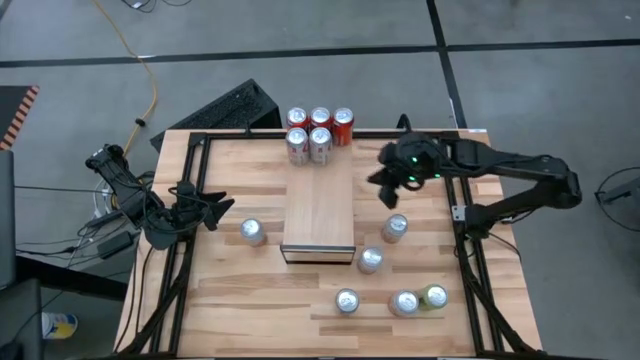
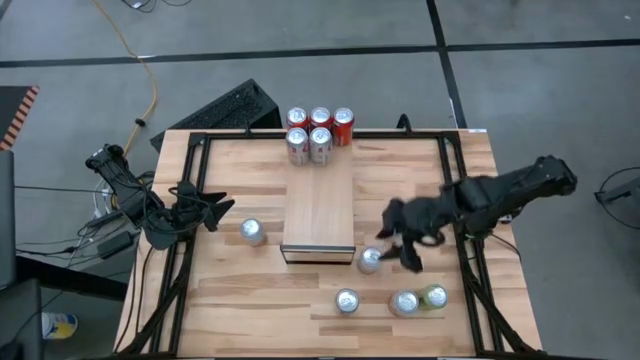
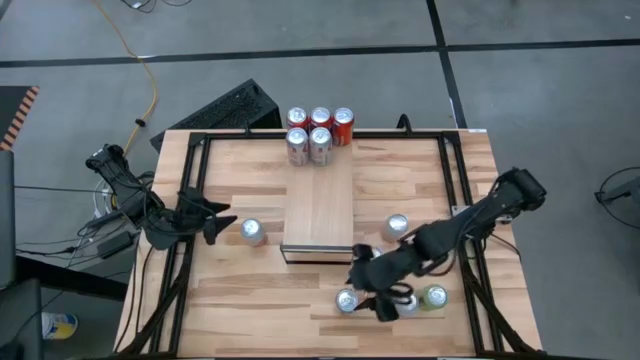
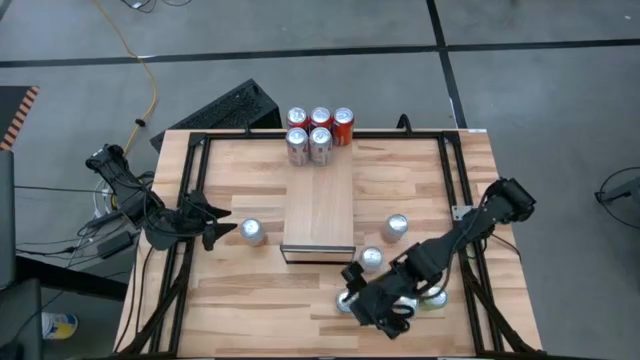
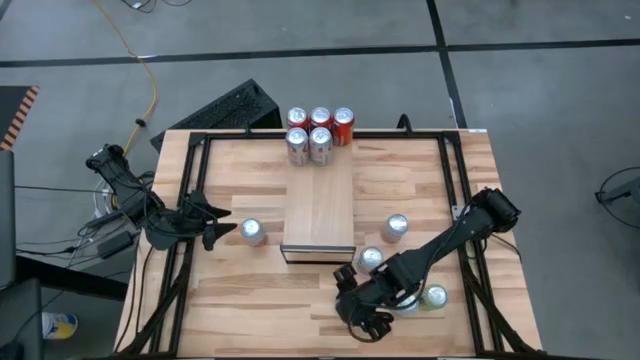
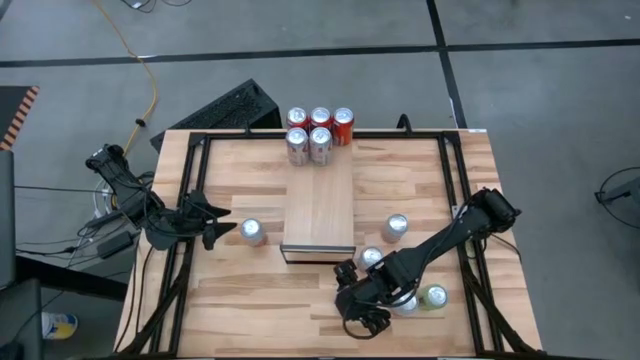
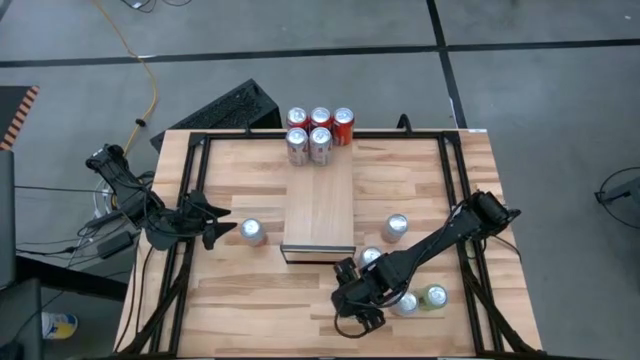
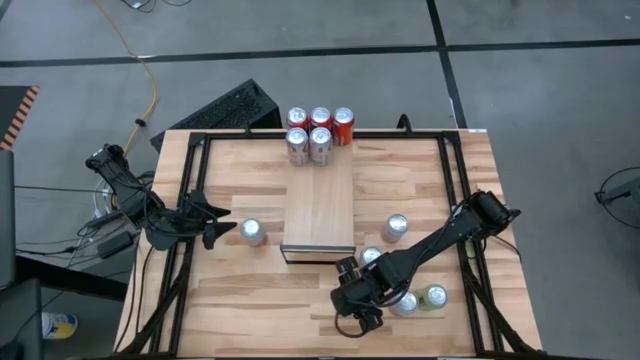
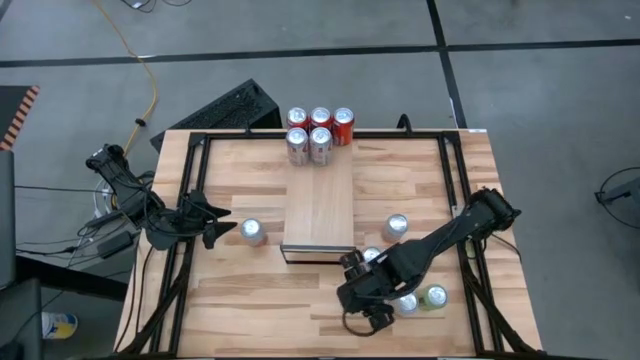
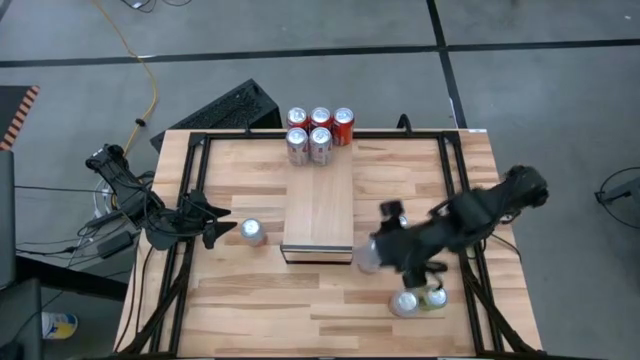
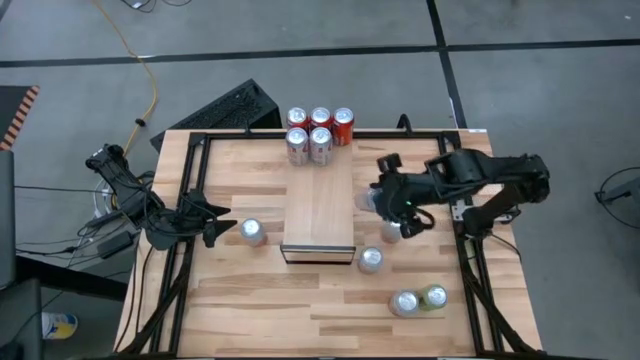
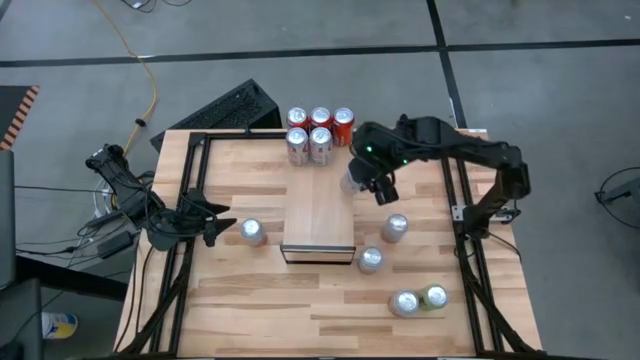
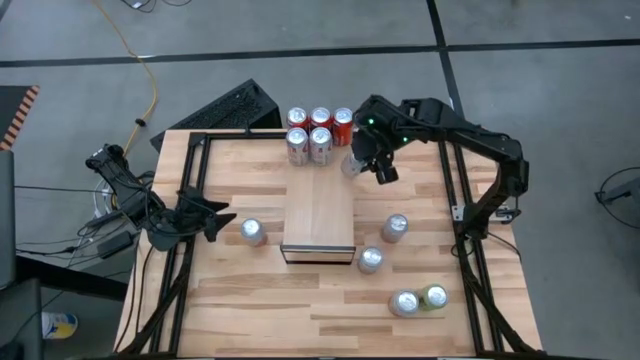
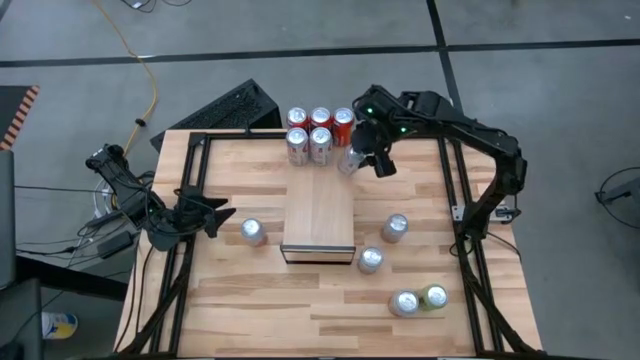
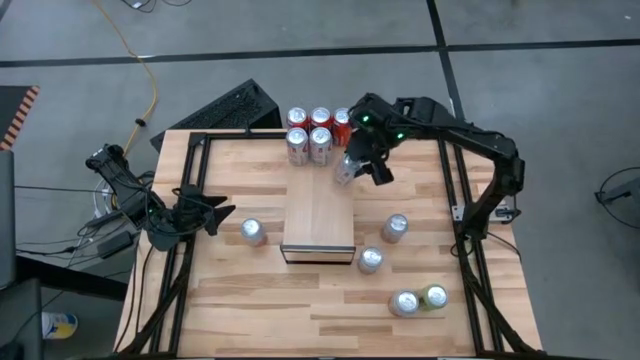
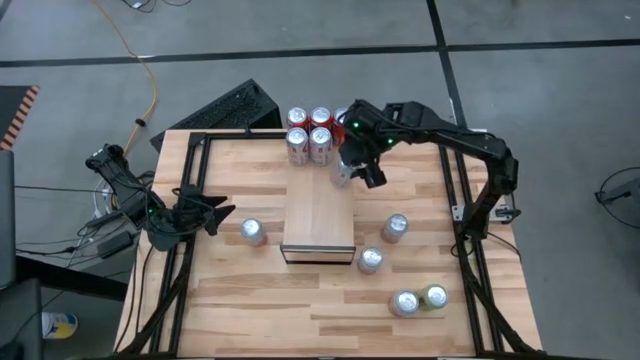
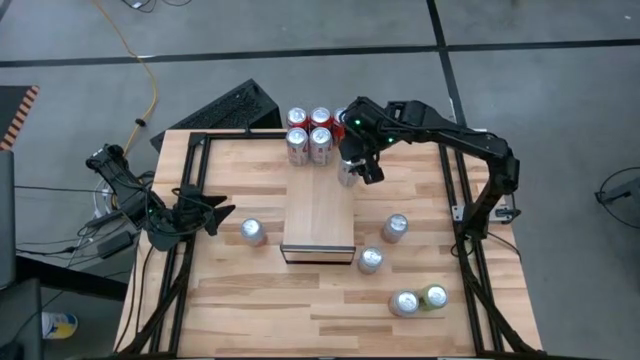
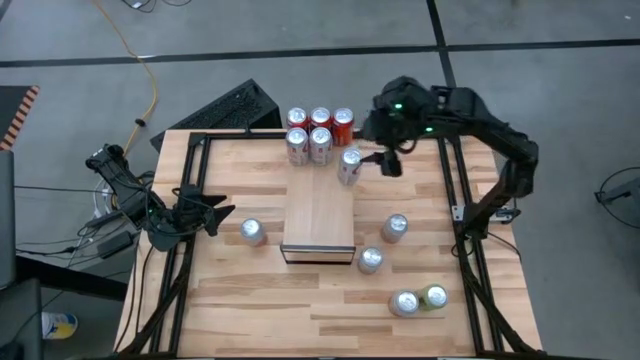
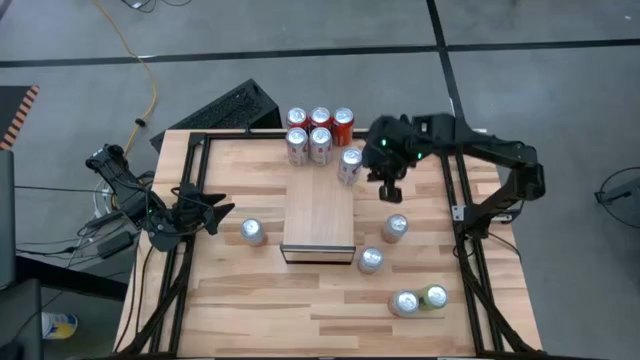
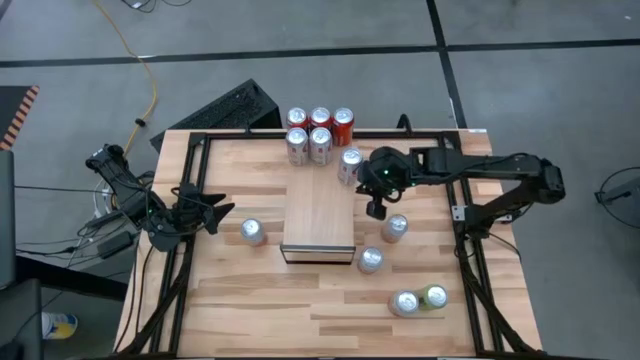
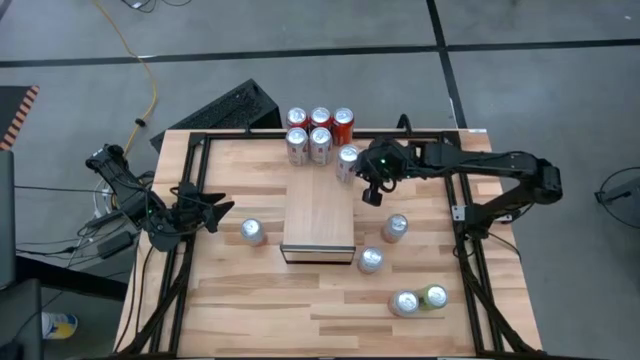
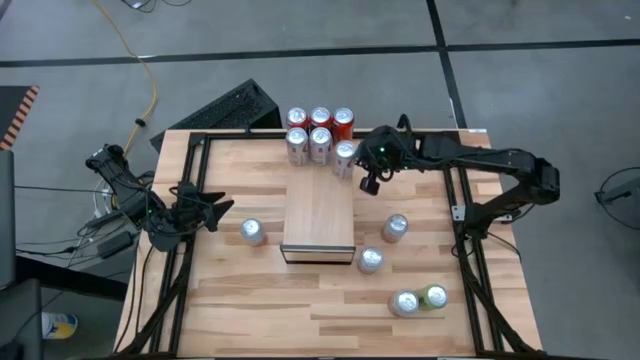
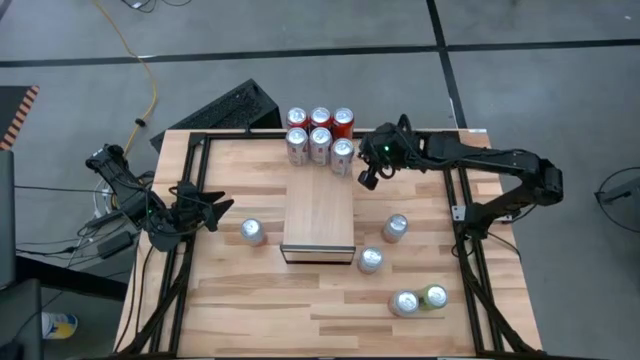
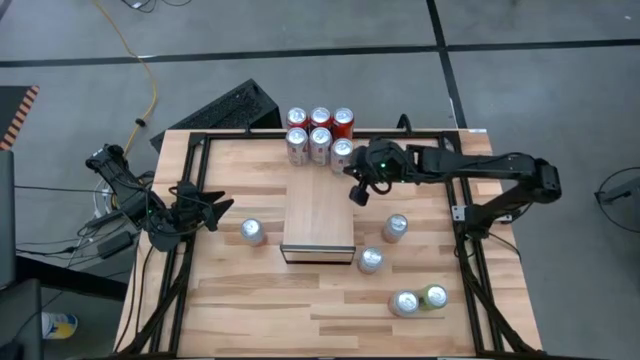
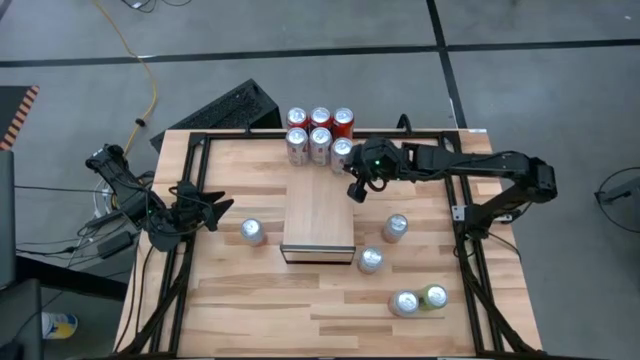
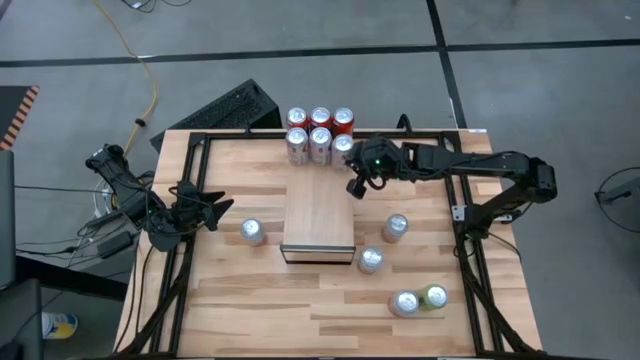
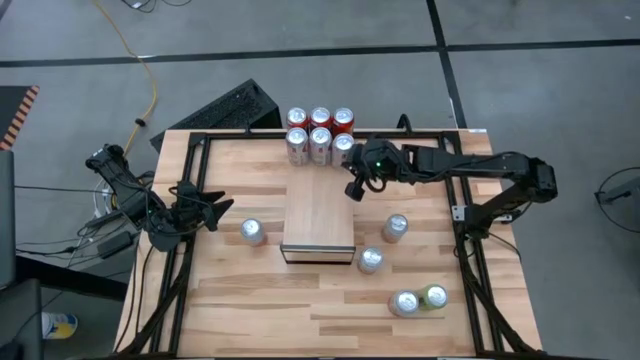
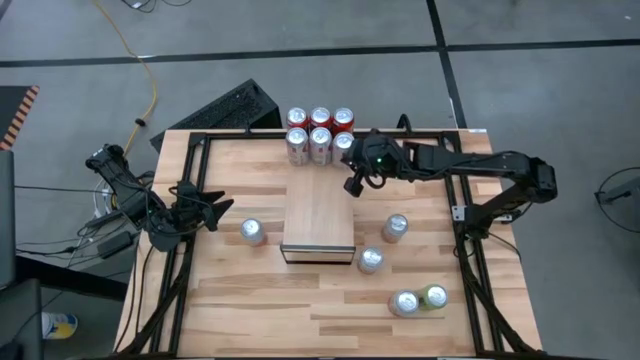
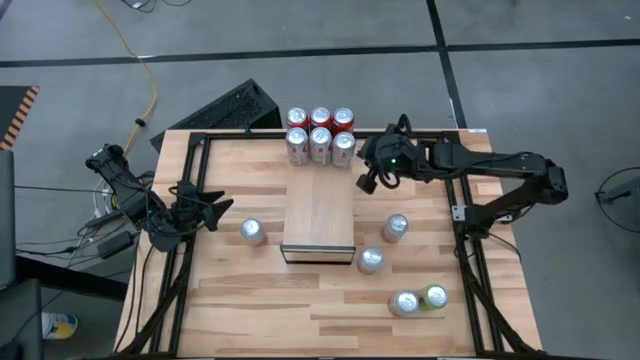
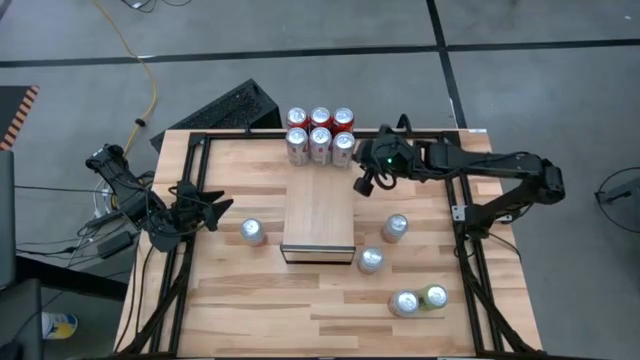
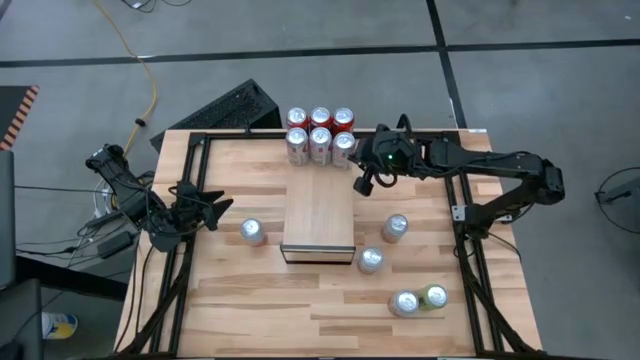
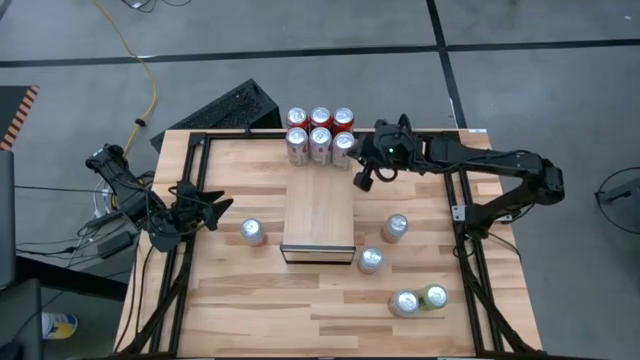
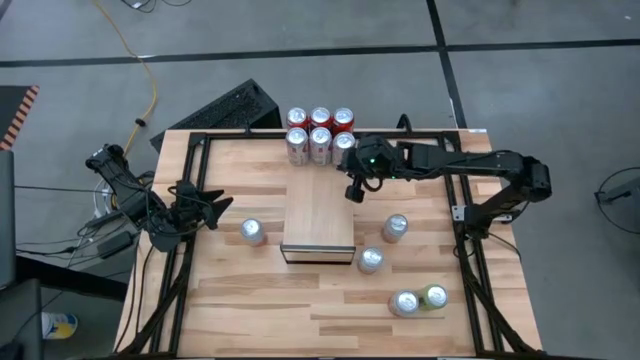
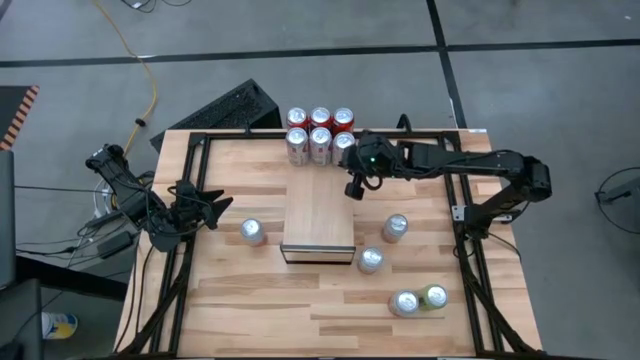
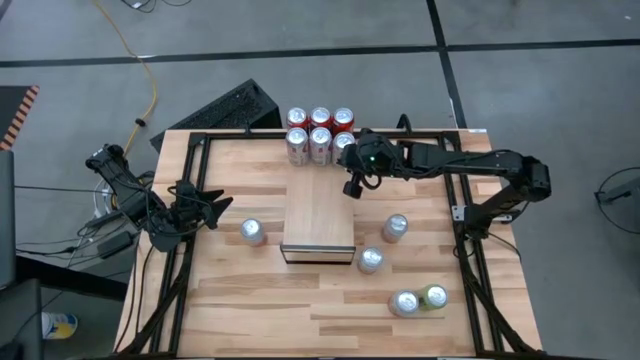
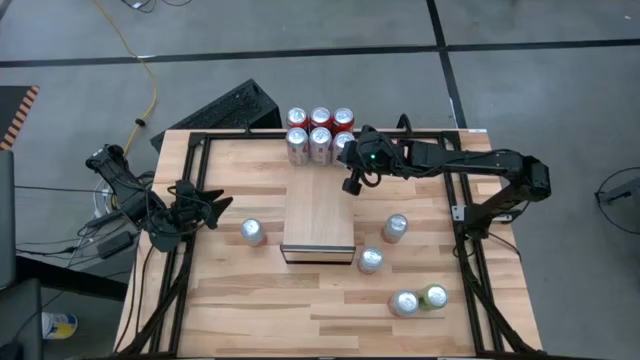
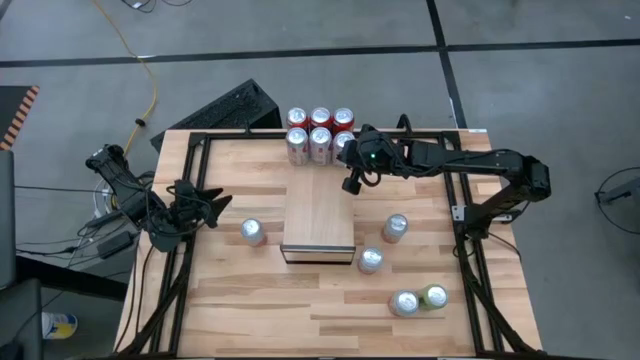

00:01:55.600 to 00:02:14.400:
Task: Place canned beverage on shelf
Put the red-silver soda can on the shelf aligned with the other red-silver soda can

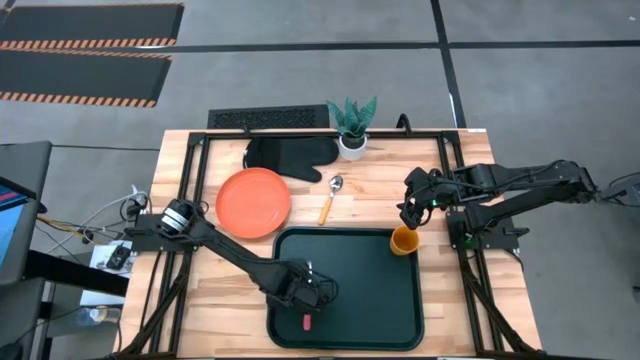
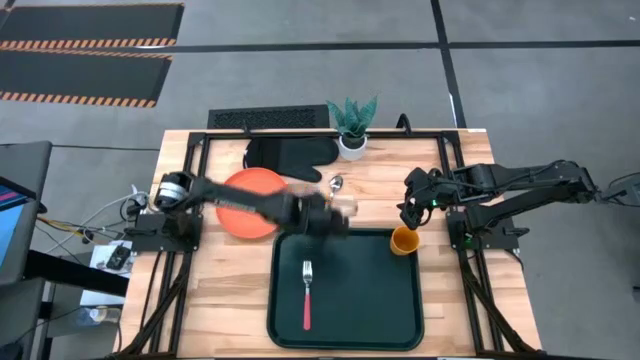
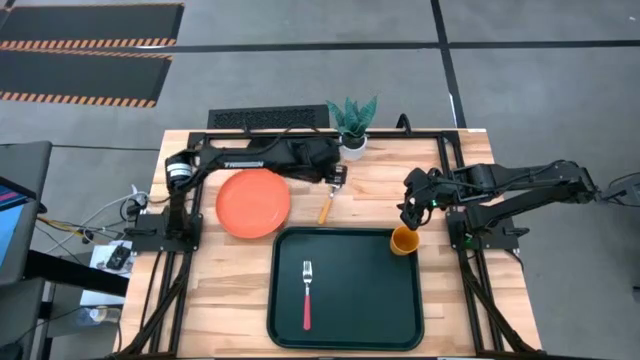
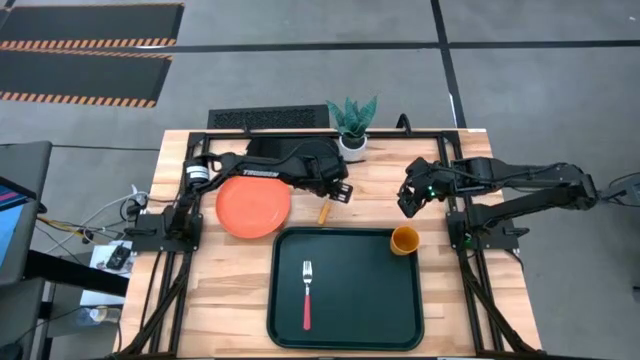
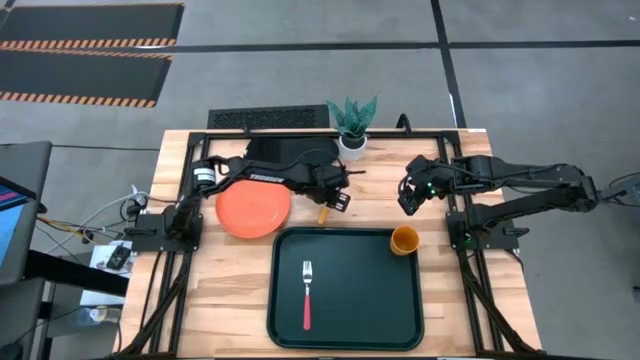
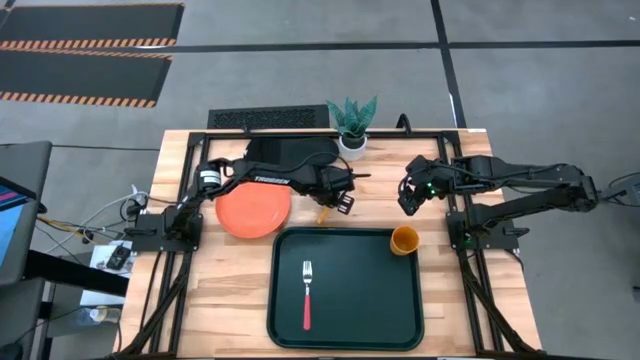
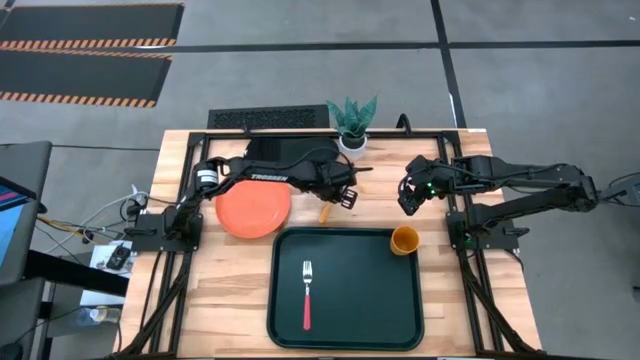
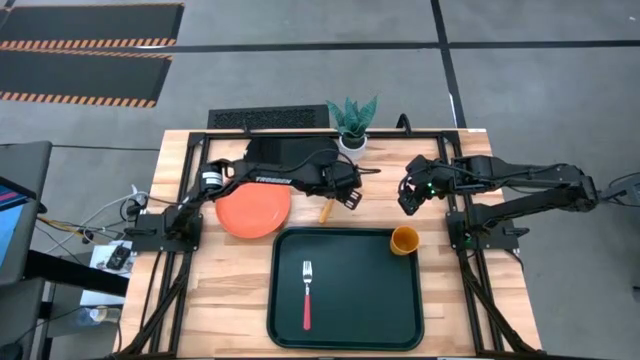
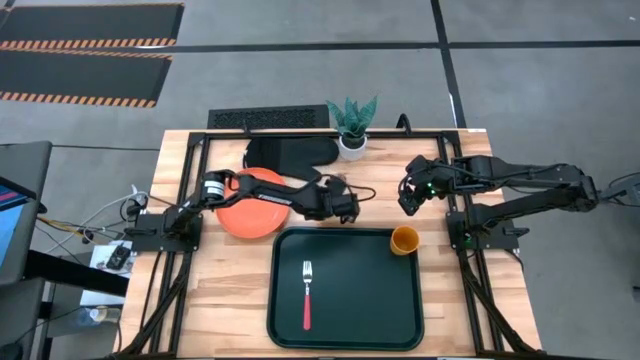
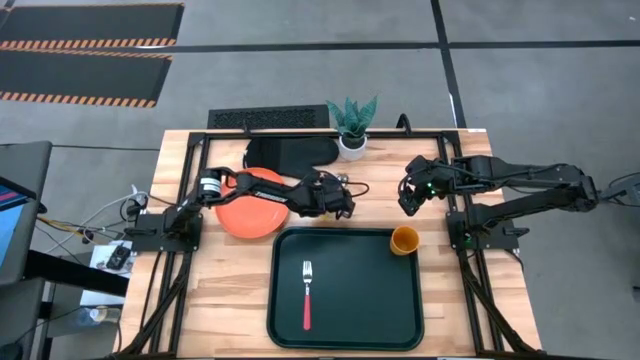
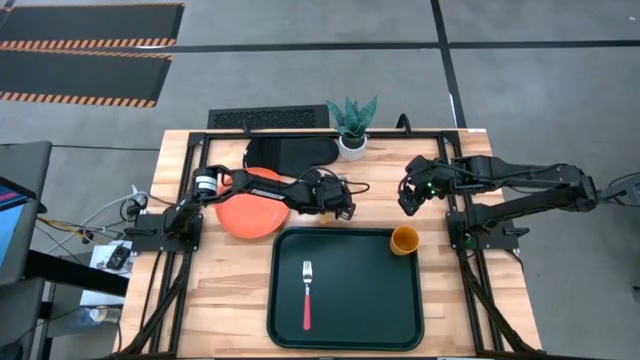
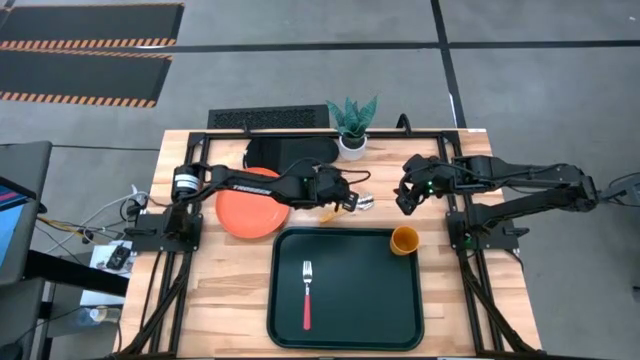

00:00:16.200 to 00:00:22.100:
Task: Pick and place plate/cup/fork/spoon on tray
Put the yellow spoon on the black tray to the left of the pink fork
